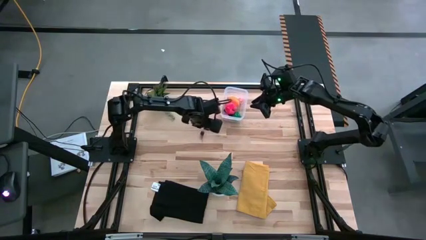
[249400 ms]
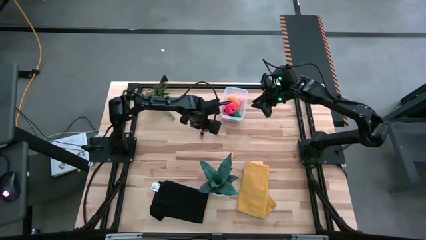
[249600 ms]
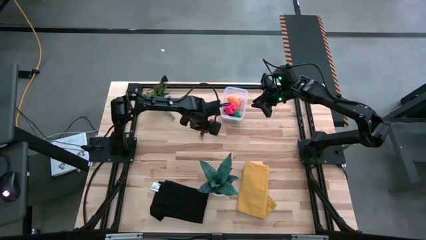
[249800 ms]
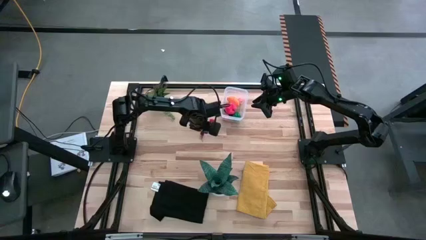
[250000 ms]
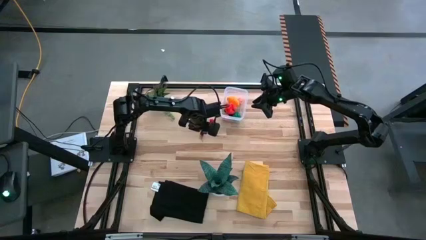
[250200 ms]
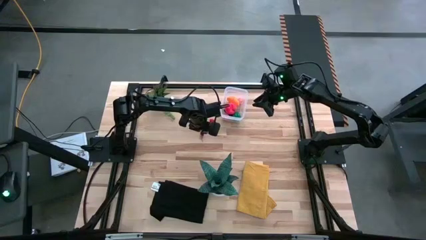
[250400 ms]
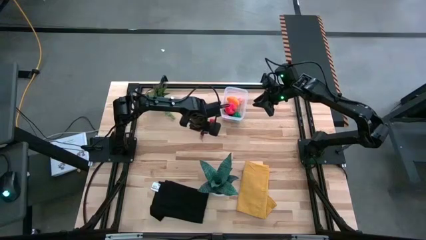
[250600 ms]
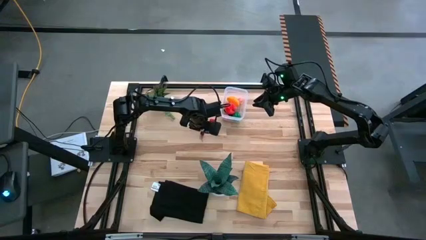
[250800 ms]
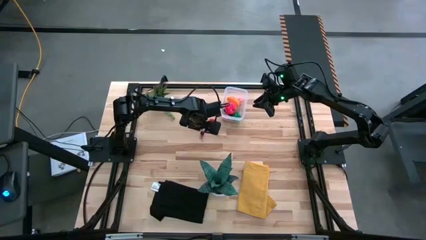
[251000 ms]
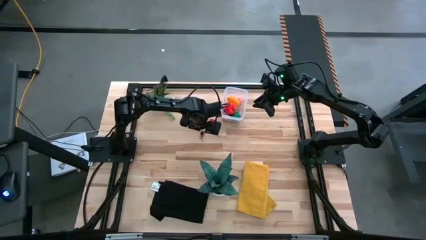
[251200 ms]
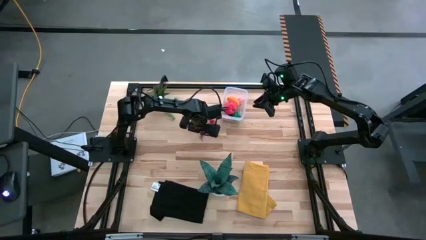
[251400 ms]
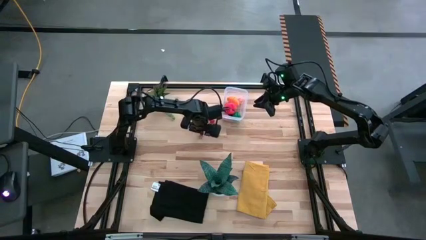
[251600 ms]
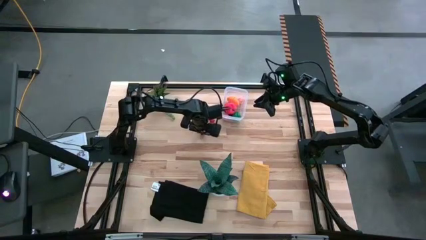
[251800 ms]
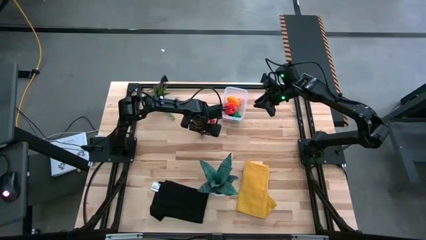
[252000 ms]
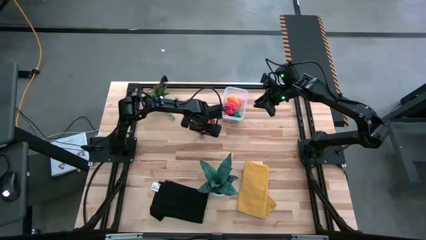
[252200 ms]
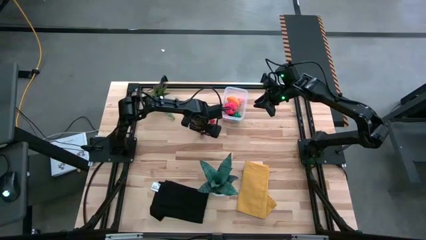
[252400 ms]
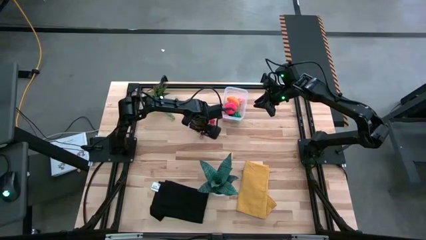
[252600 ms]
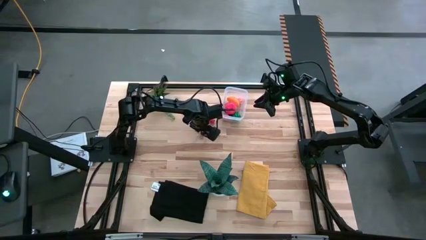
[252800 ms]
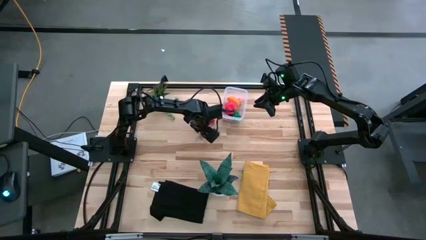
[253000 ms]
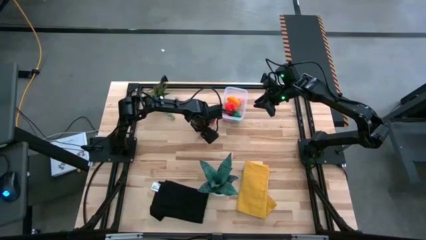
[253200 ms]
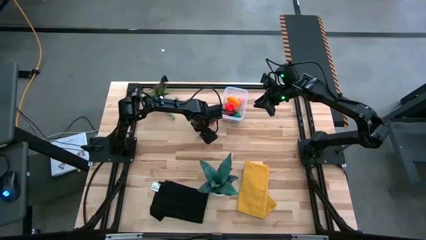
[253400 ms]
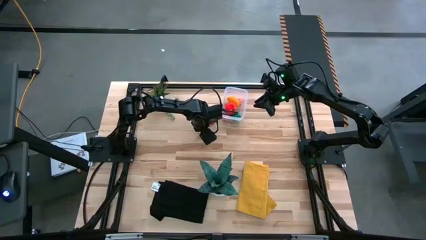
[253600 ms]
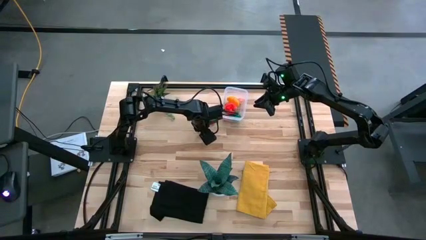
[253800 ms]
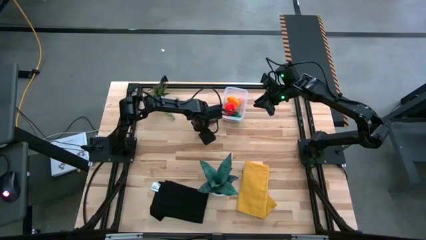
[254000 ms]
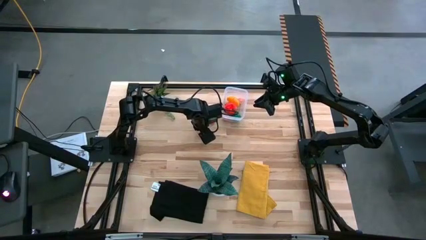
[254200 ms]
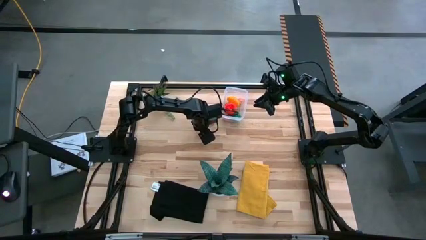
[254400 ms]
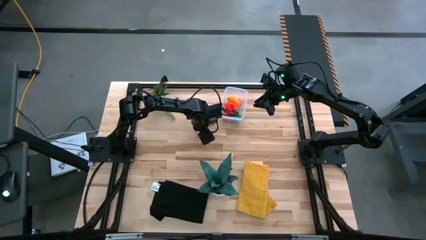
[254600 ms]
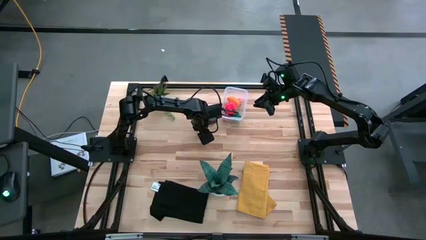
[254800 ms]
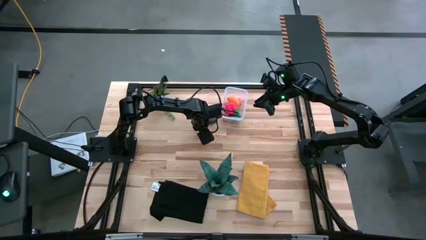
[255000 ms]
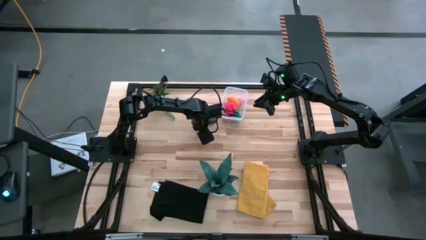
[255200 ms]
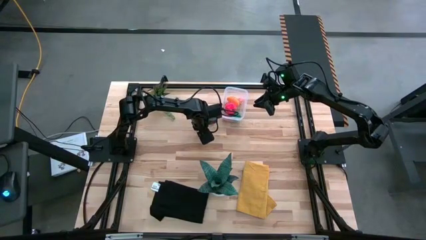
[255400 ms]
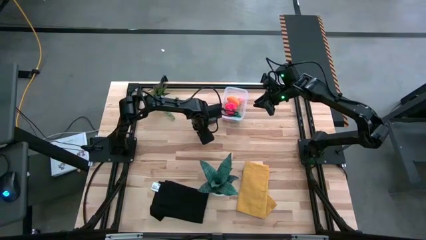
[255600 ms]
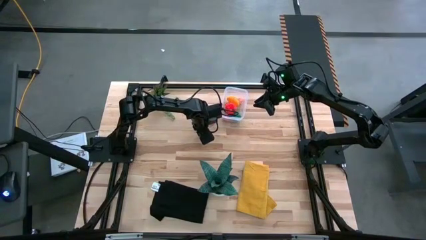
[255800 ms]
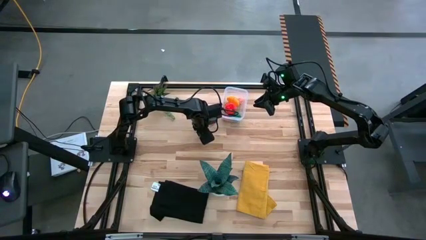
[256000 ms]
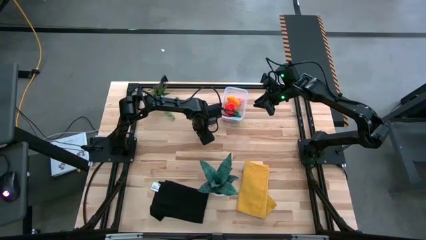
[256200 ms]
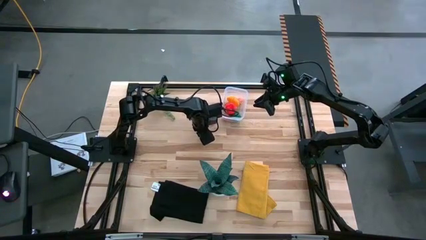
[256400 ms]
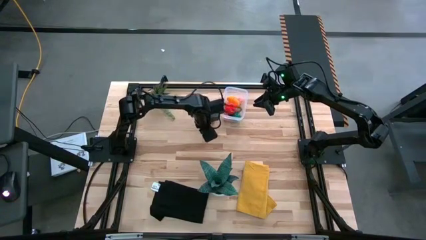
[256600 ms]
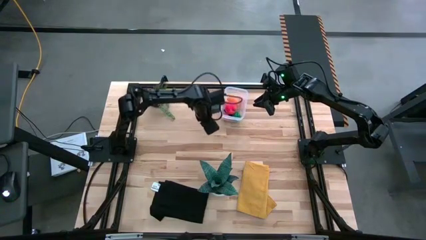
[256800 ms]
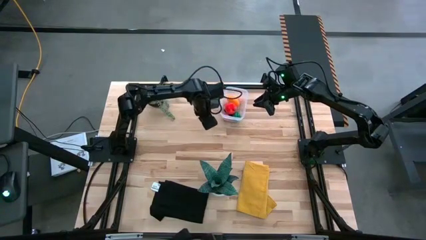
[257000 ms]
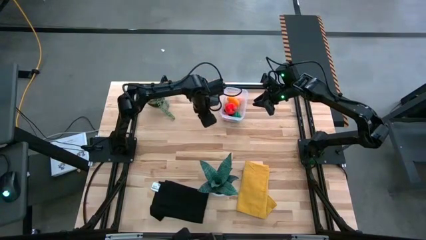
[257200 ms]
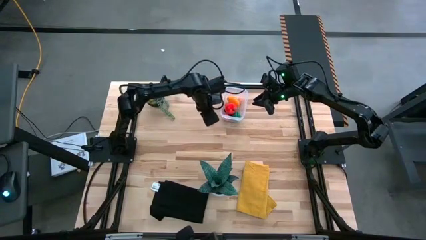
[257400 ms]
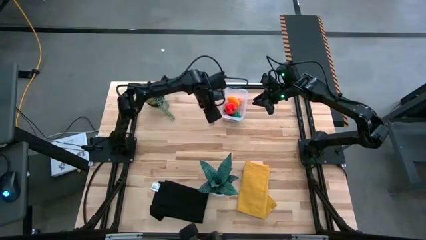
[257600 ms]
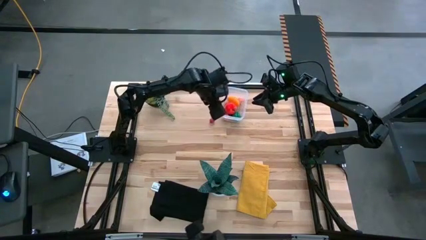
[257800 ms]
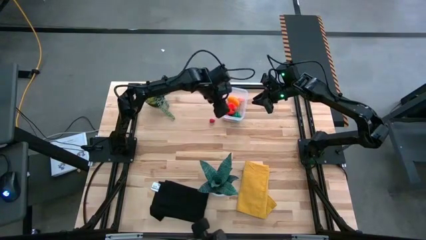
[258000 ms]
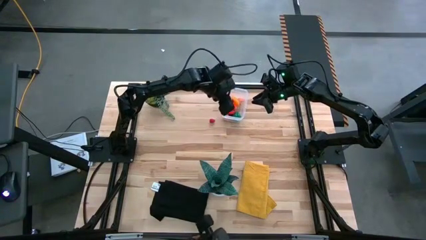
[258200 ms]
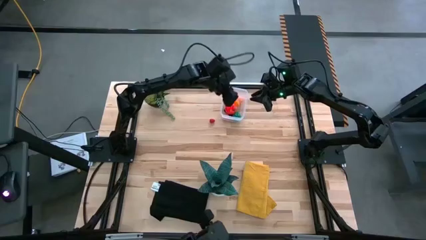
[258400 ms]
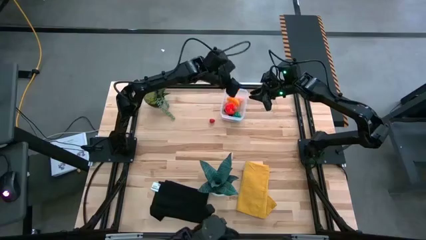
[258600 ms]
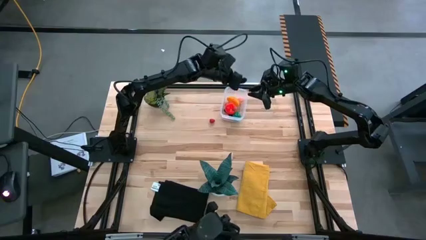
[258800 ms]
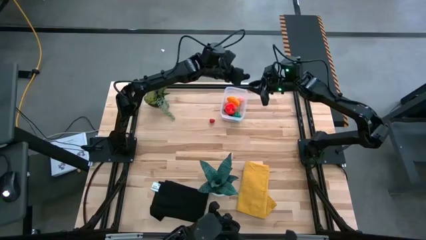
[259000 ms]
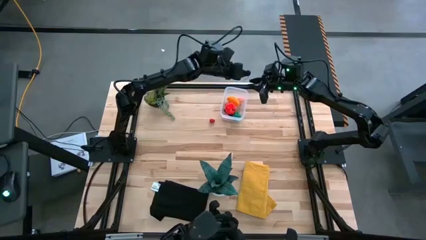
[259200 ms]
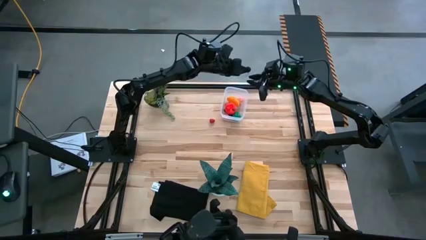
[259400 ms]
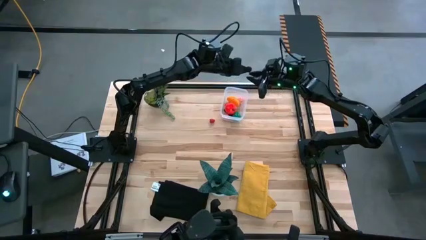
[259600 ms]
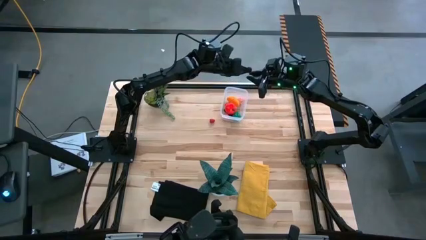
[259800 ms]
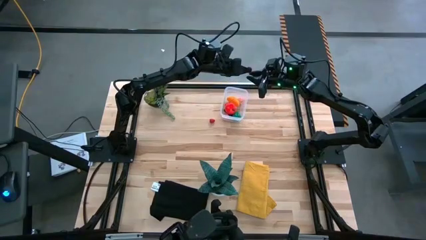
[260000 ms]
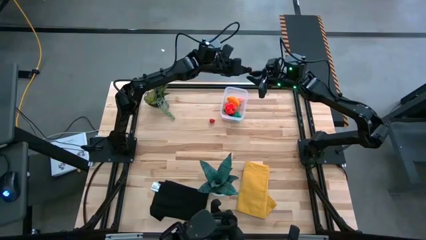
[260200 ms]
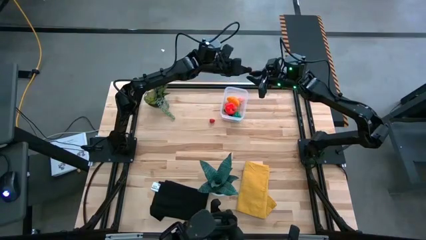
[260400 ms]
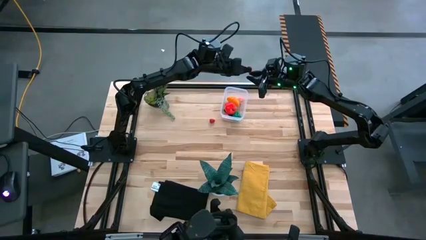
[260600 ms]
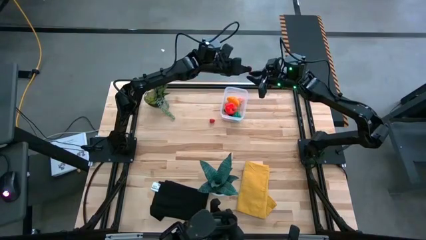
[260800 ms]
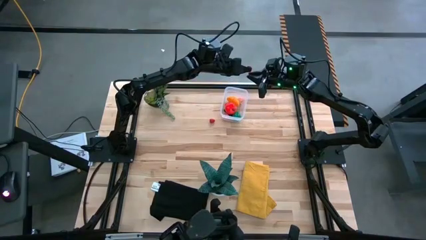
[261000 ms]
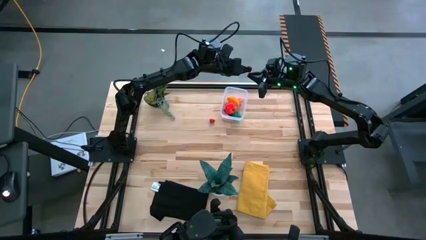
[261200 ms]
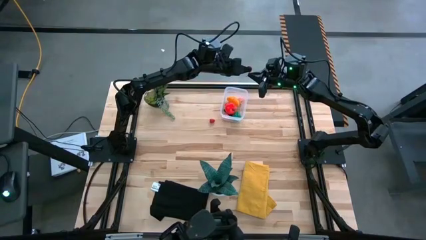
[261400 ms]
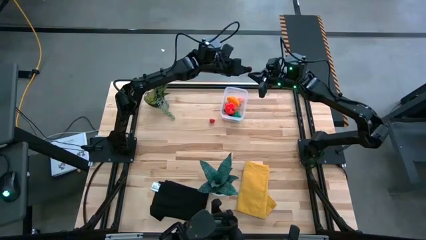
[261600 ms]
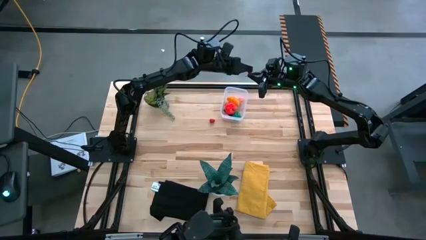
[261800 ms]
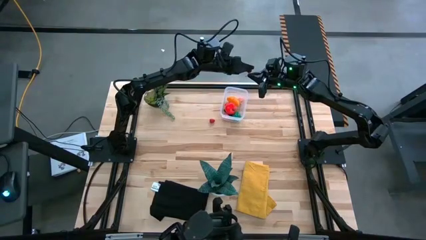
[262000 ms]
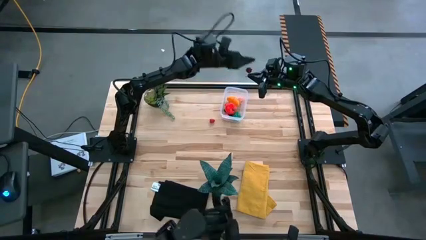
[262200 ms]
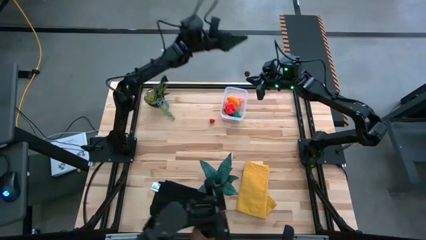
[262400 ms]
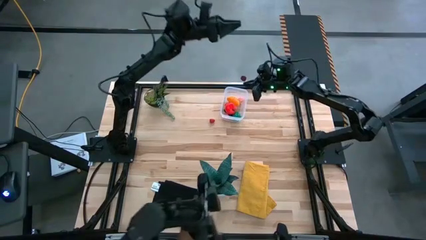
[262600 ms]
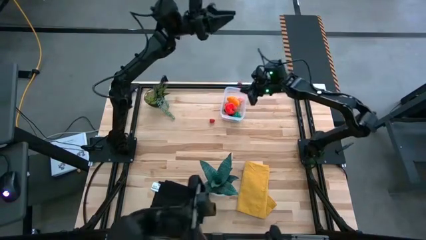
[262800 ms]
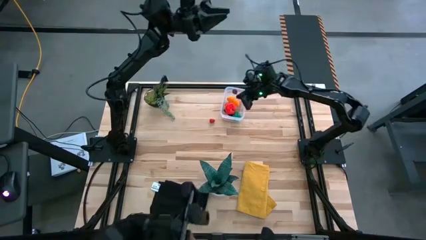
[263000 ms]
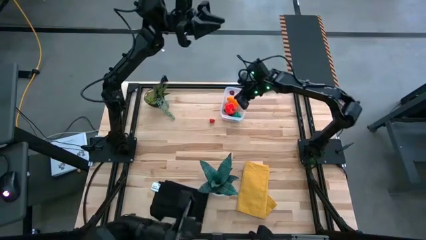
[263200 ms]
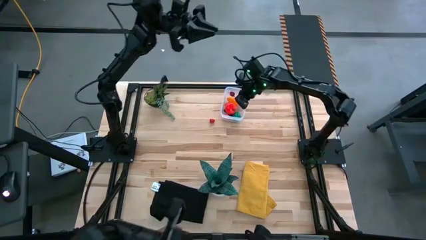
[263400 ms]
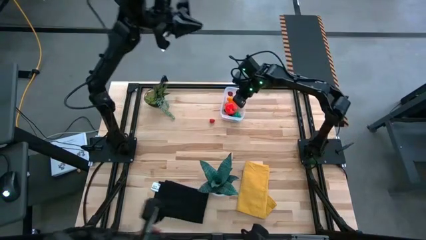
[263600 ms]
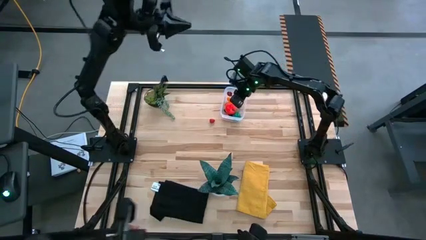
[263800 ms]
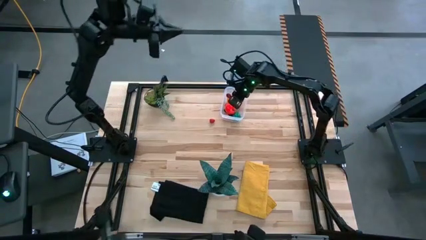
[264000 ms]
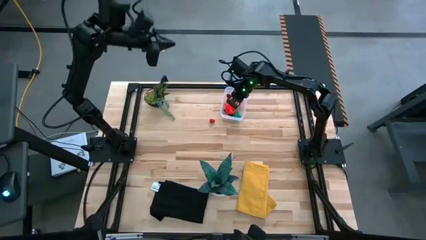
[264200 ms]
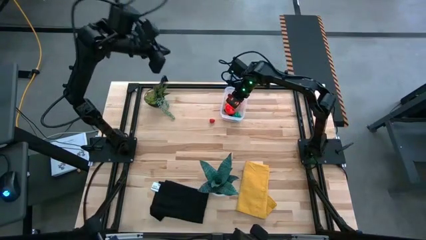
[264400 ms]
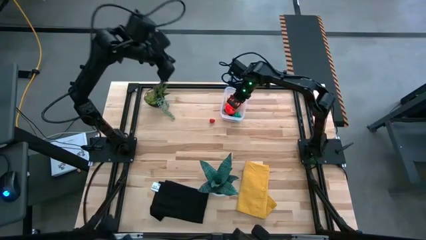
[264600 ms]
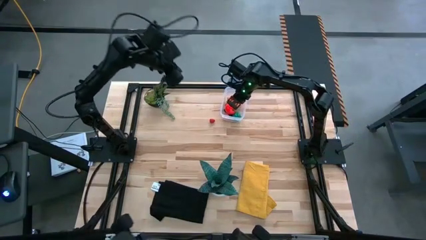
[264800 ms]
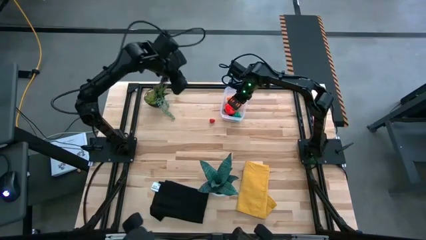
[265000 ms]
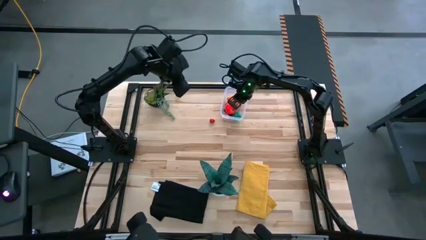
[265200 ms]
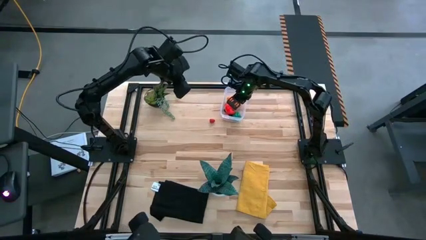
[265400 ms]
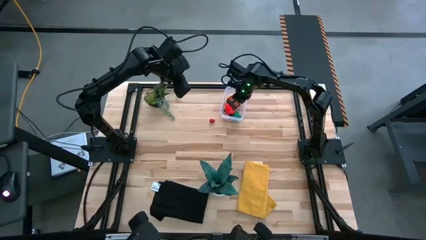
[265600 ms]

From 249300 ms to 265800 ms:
Task: Pick and placing Produce into tupperware
Put the red cherry into the transparent container
